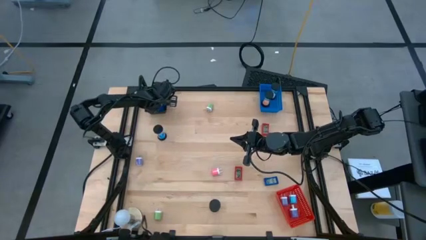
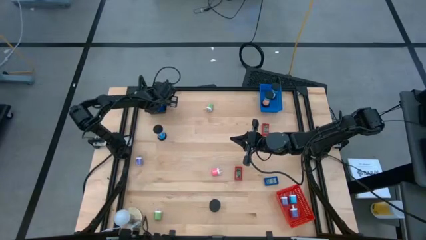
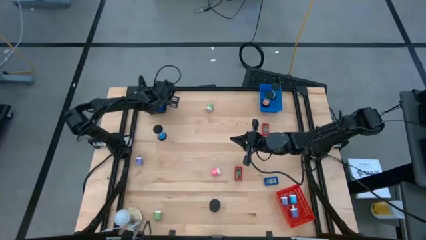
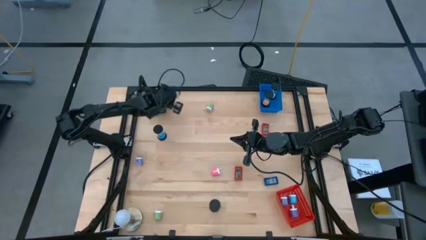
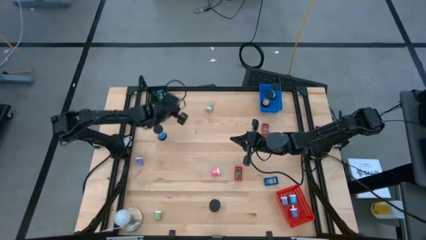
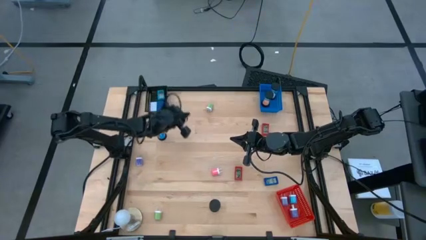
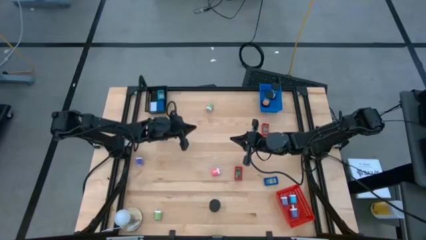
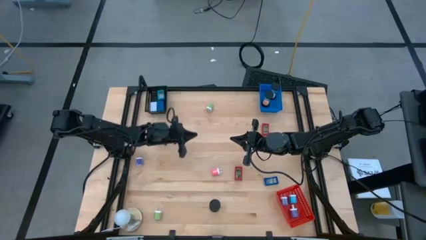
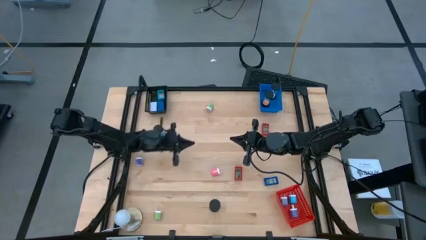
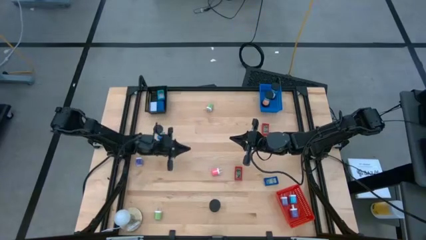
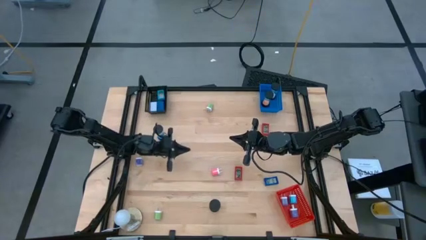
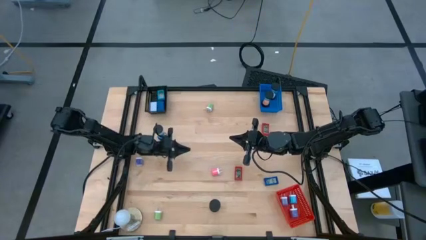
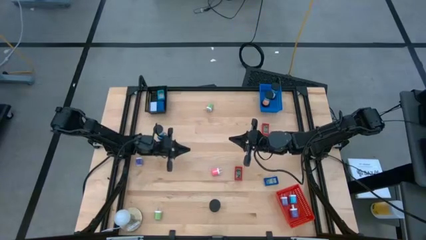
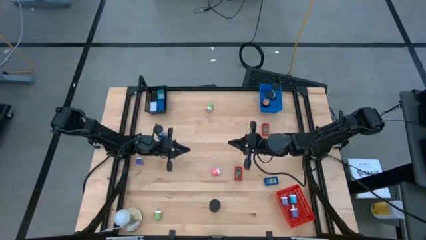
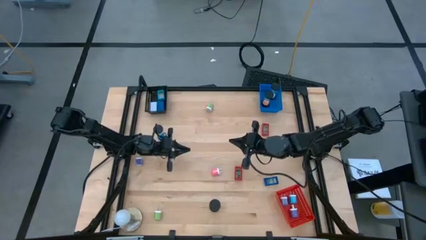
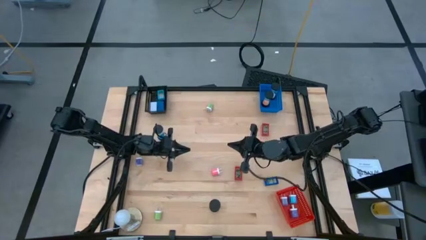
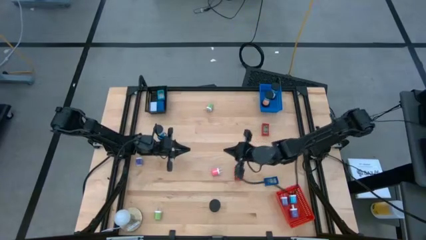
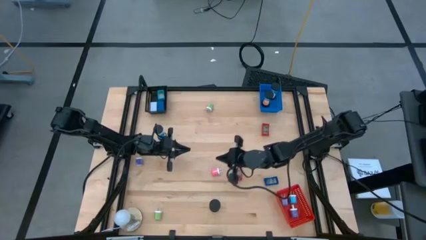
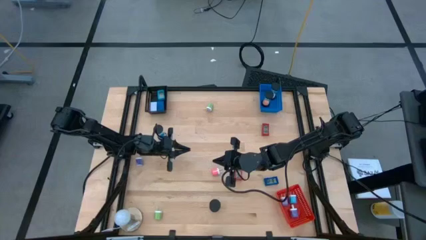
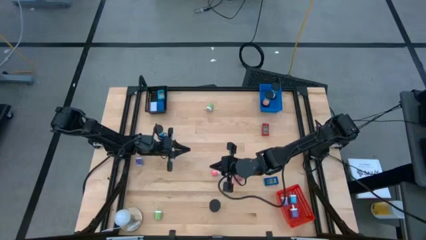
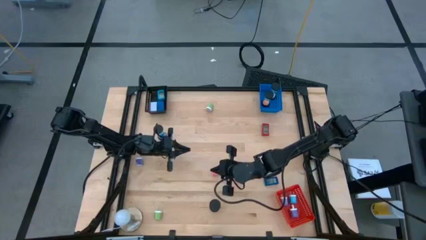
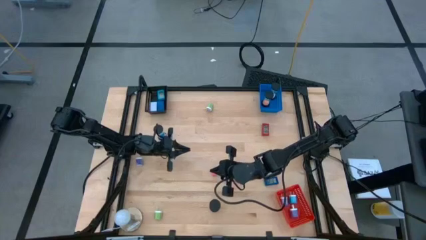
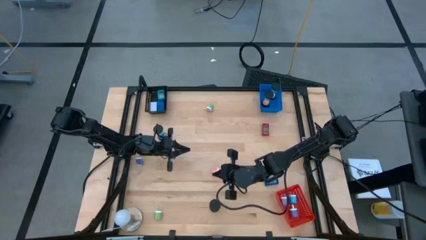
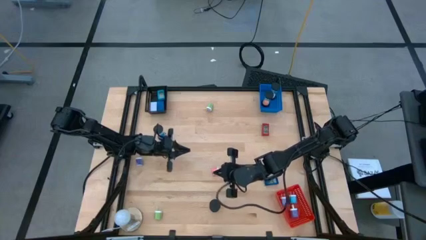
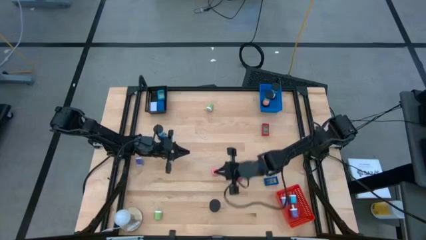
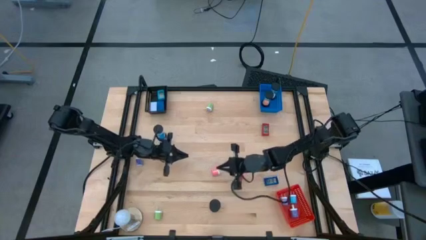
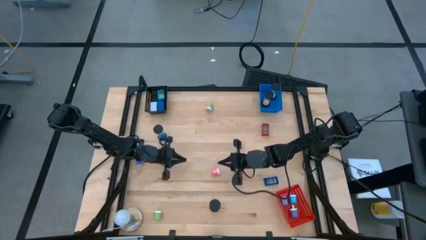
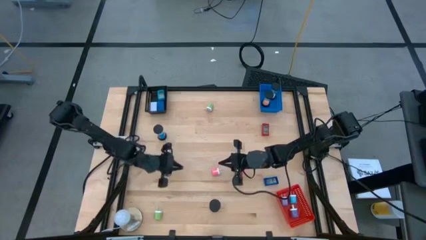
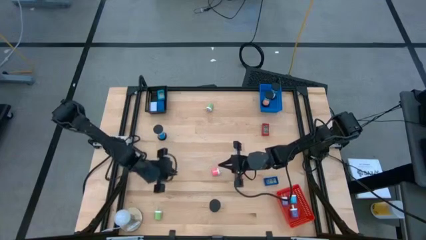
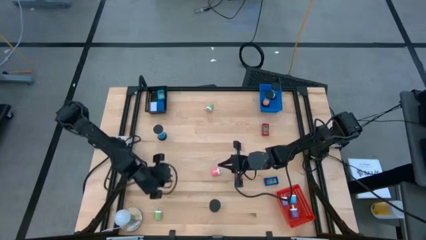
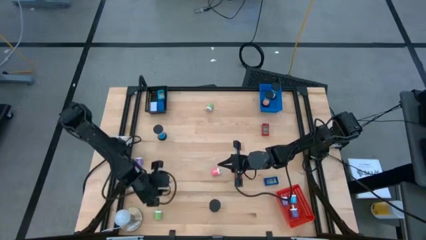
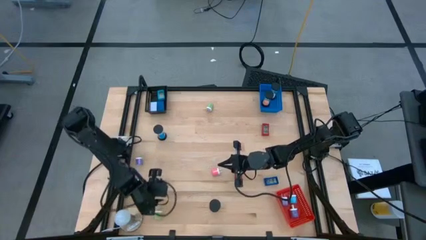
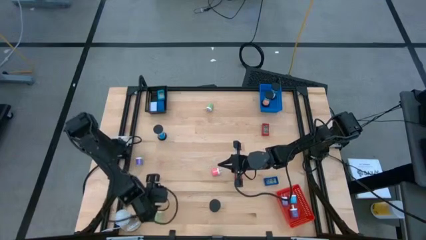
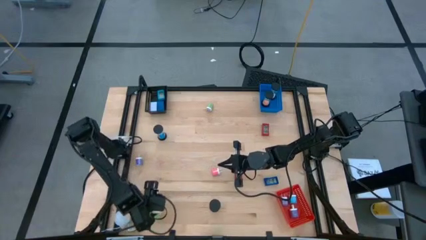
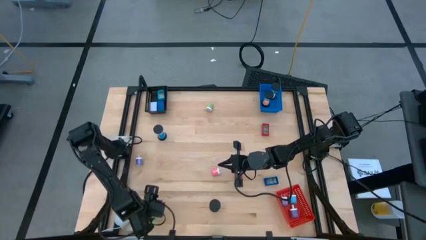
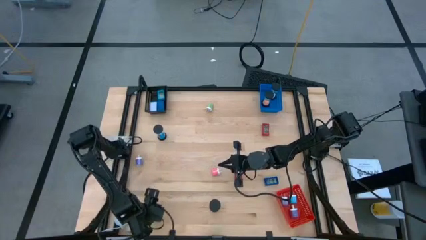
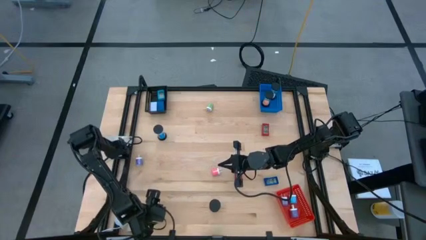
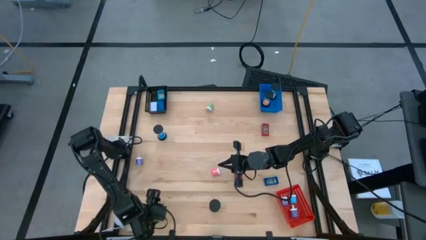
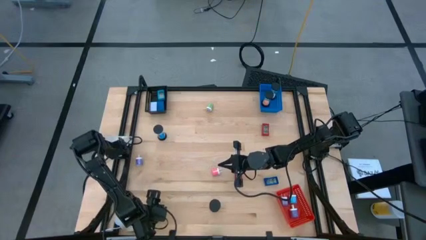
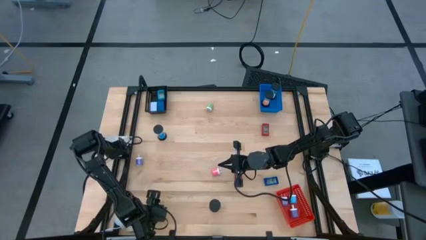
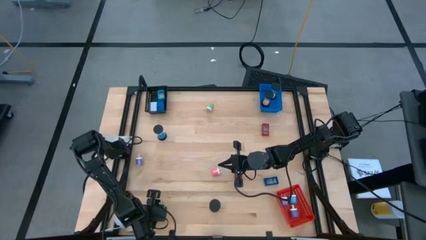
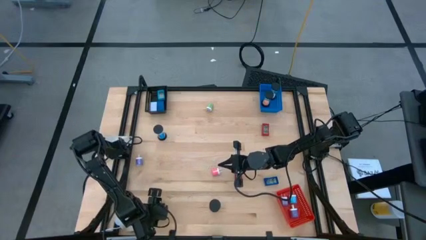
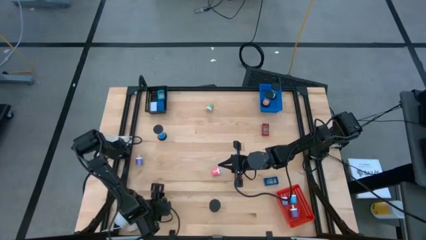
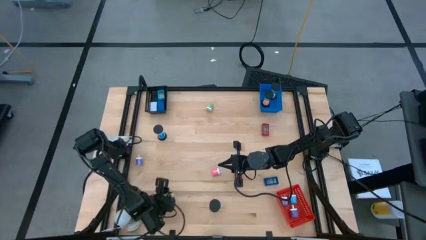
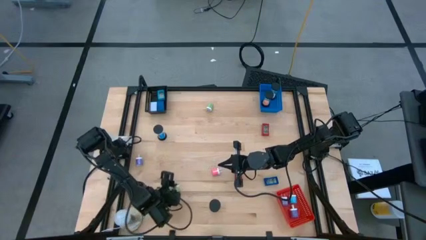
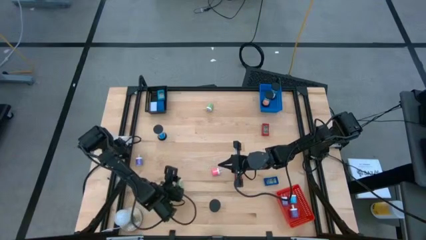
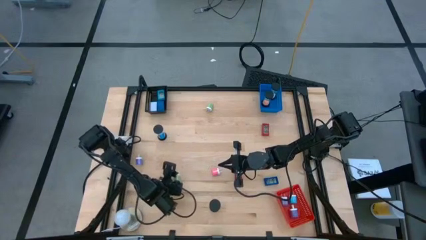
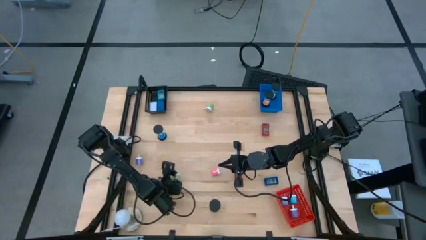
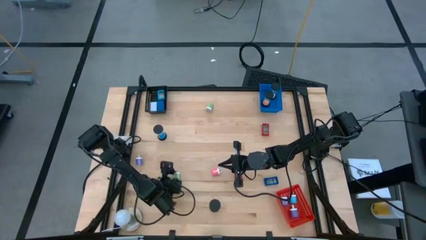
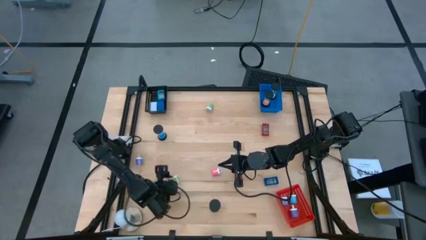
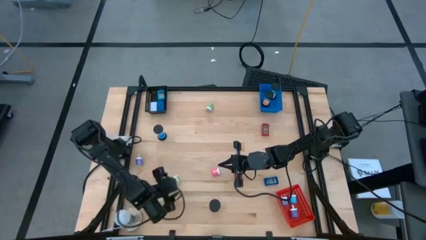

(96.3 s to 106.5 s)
Task: Pick & Place Office items
Put the bottom green charger adapter into the red basket

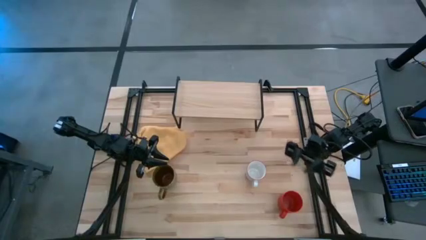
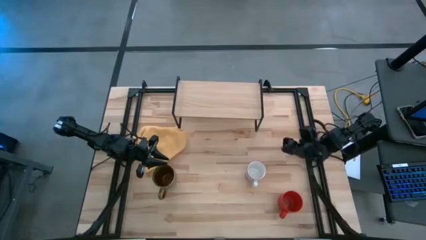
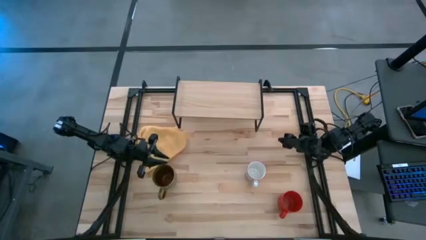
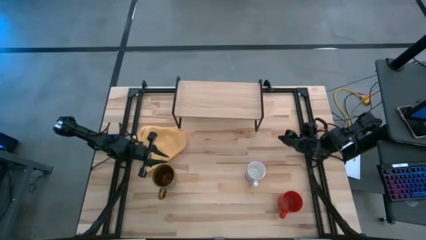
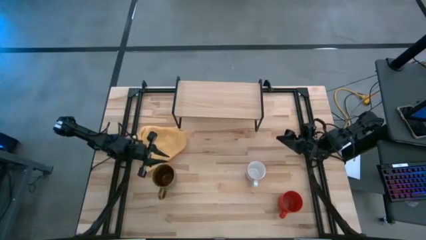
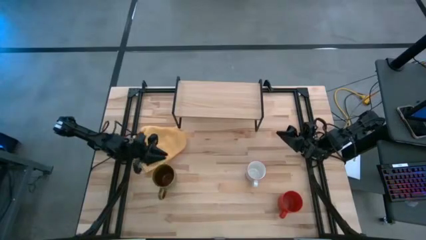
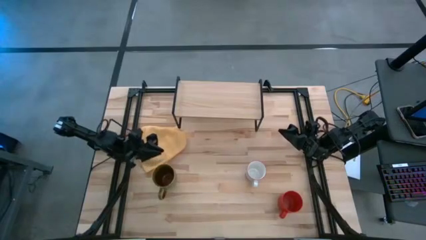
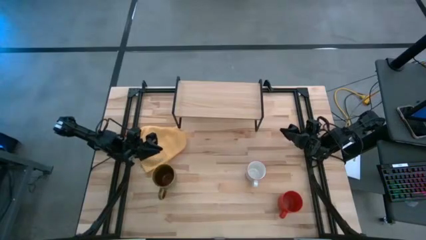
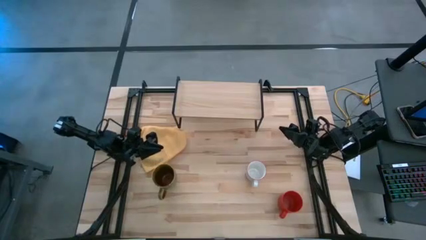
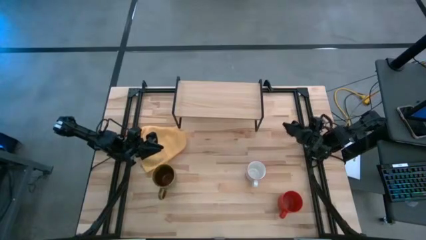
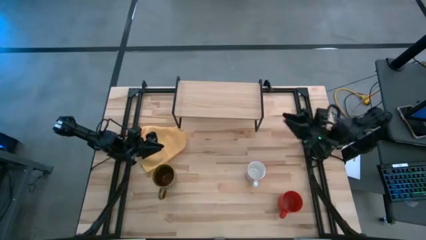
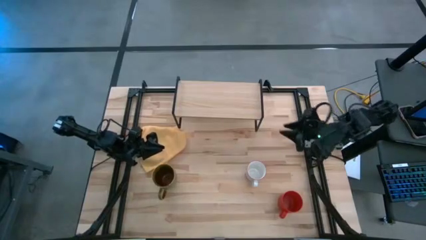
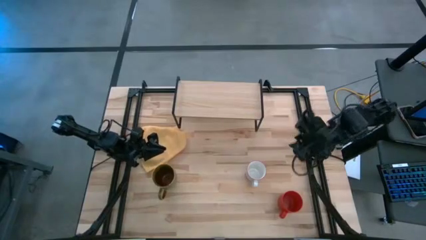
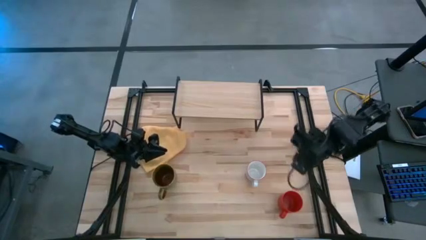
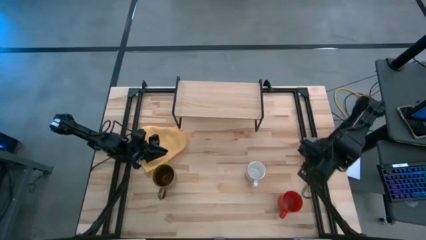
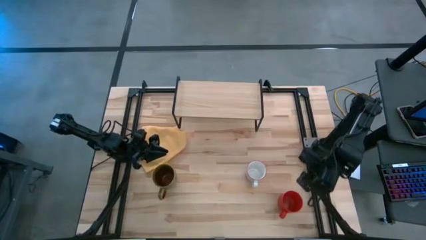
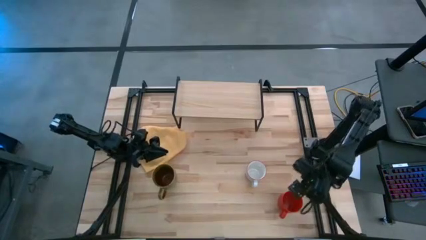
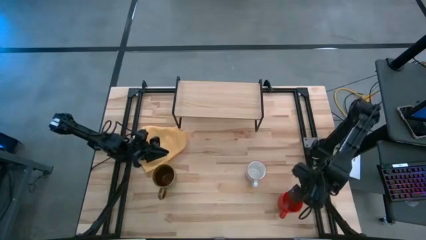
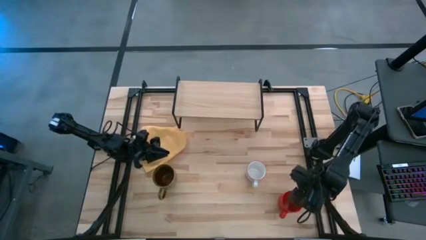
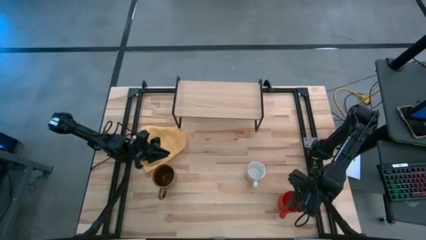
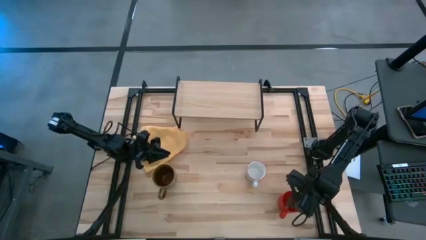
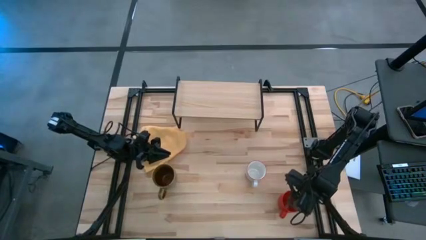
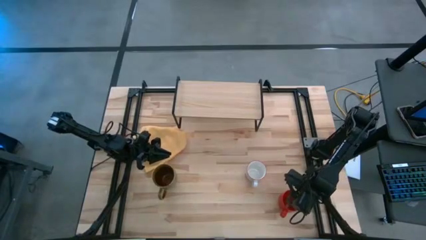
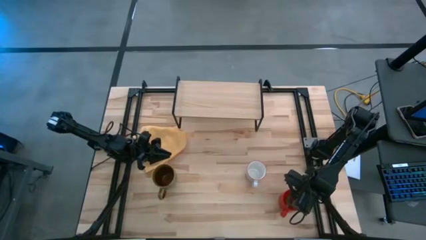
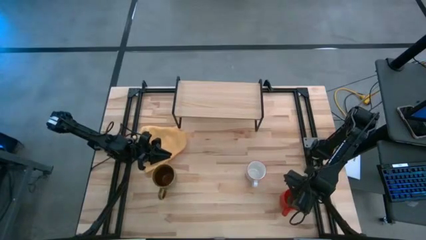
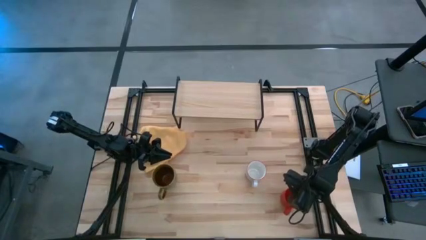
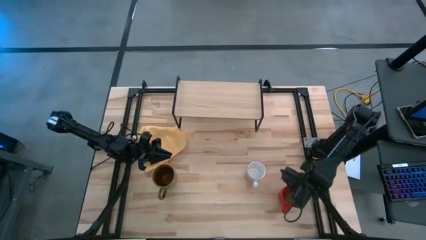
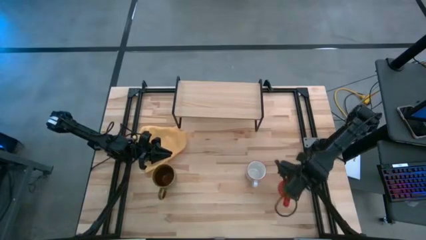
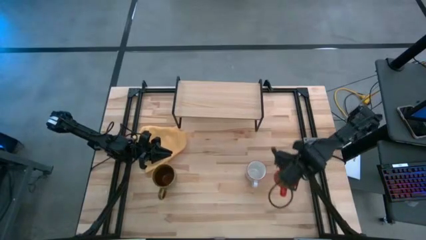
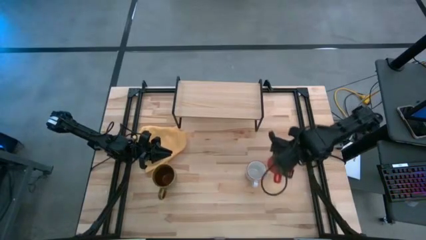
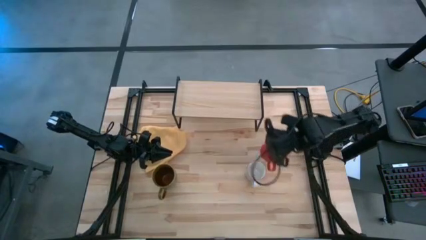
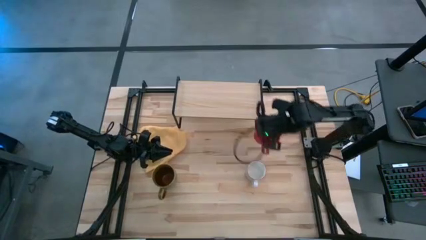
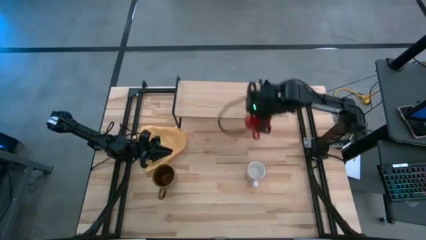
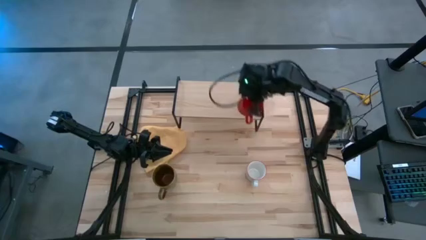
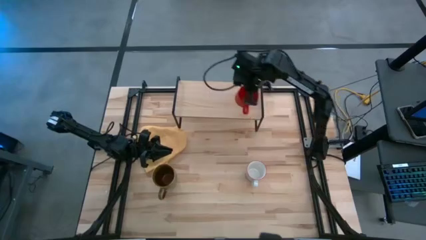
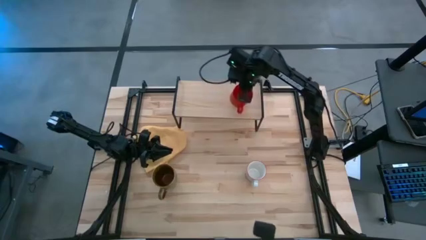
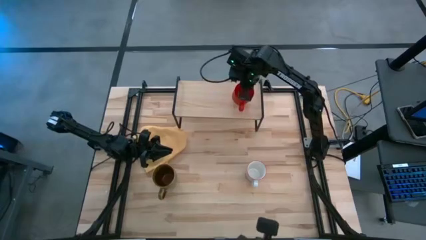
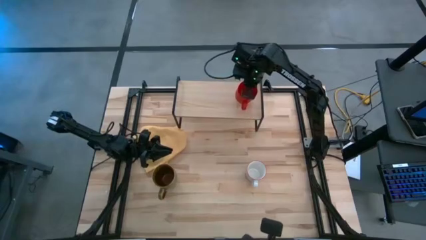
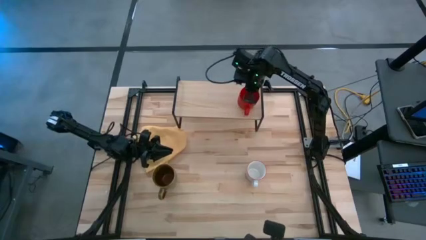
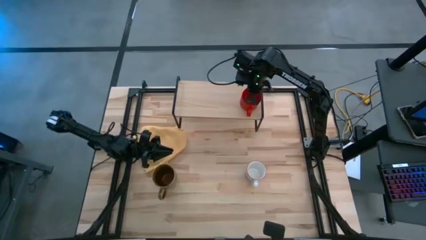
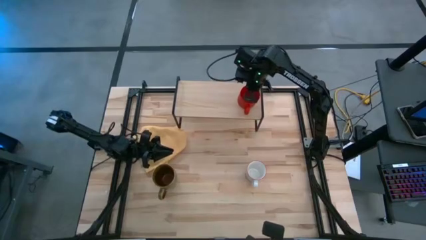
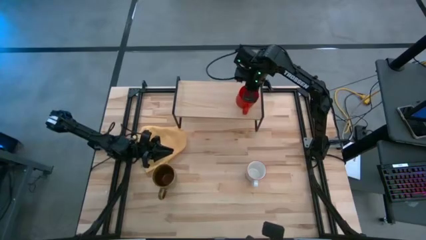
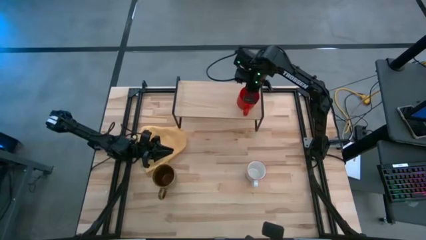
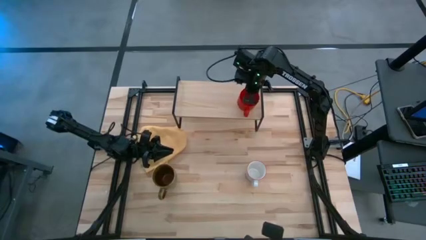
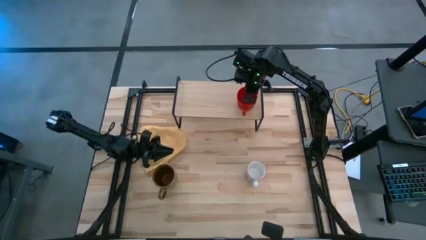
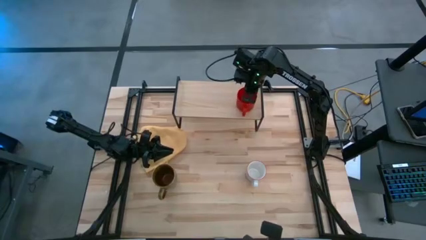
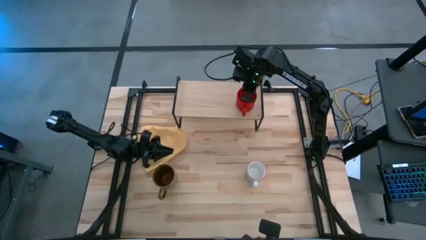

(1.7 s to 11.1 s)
Task: Stack small to large cups/mugs on shelf
Put the red mug on the shelf
